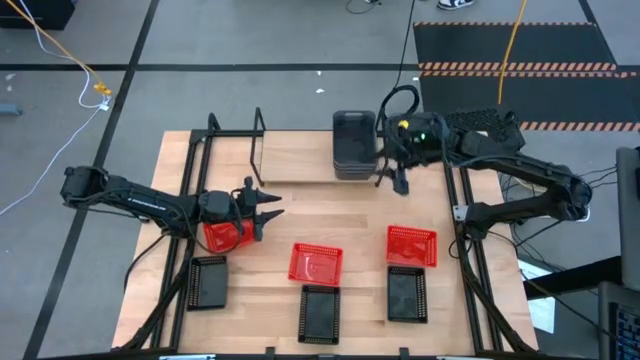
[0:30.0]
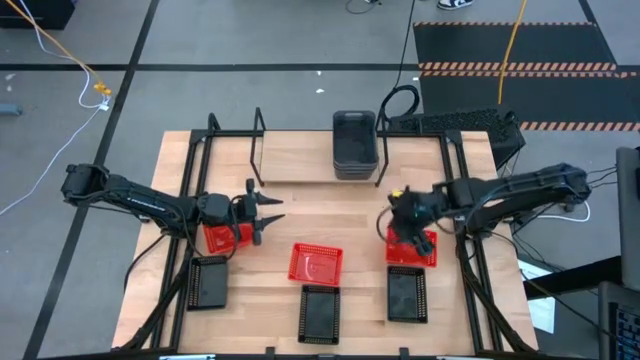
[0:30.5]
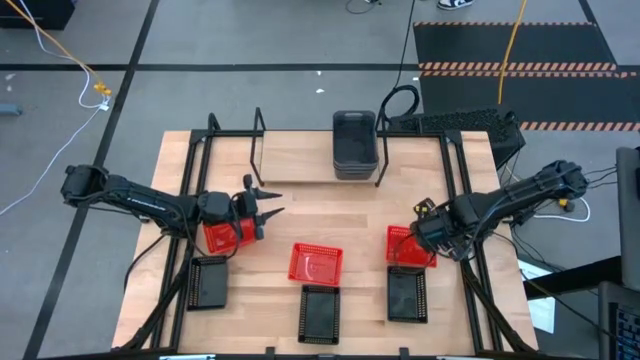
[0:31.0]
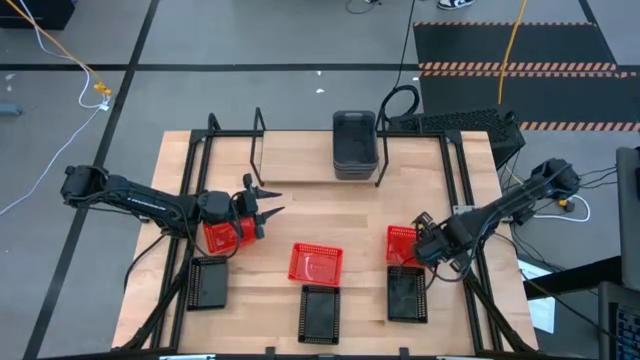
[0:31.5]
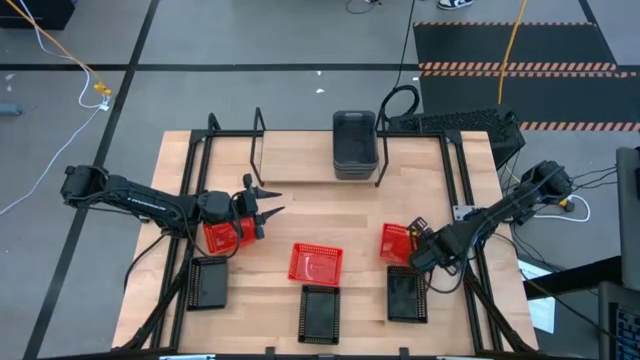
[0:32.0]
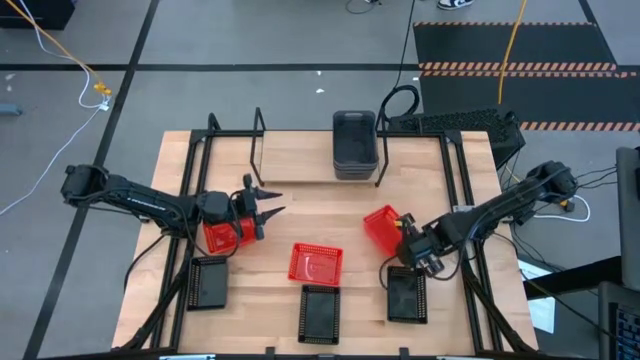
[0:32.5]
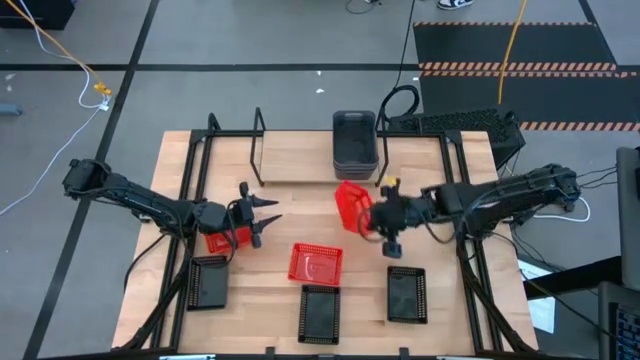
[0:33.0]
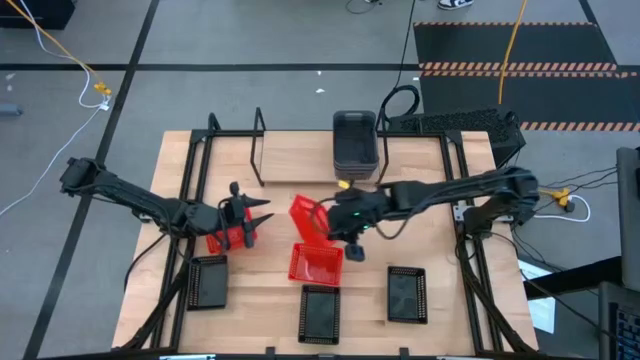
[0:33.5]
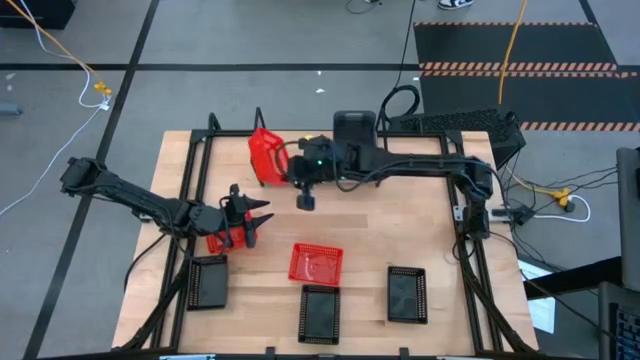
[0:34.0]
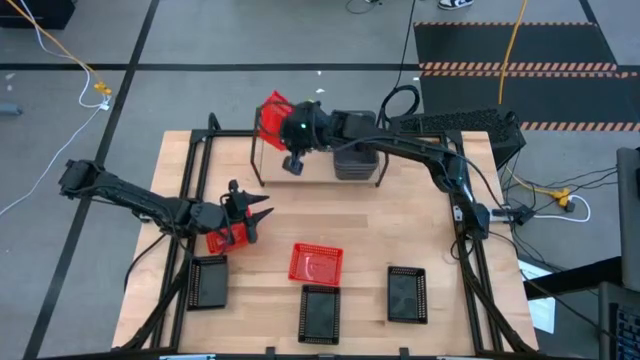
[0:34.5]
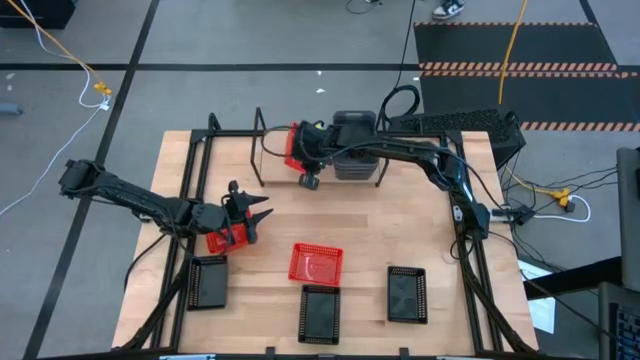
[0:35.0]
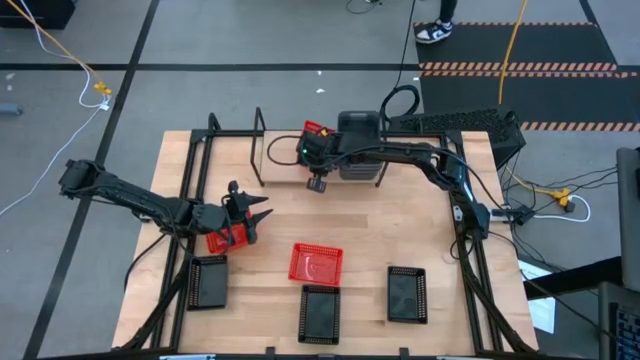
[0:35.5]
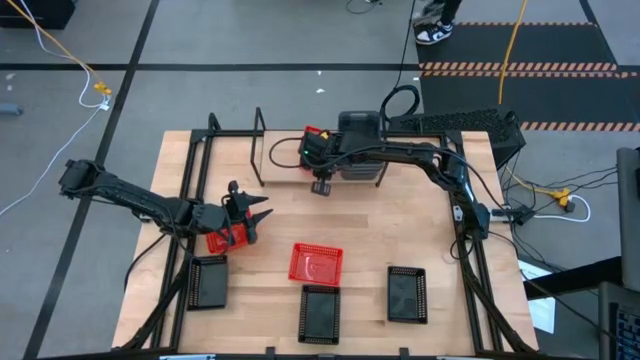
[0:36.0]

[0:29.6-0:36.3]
Task: Stack baskets on shelf by color
Put the right red bin on the shelf

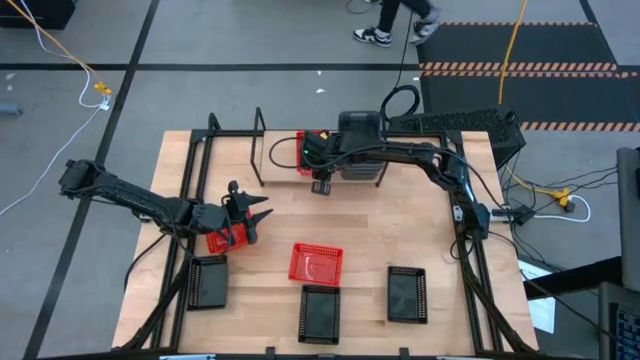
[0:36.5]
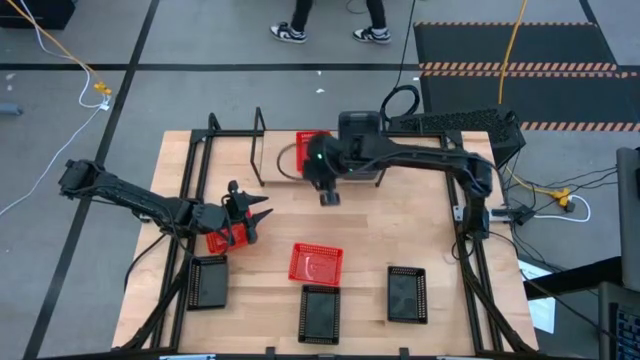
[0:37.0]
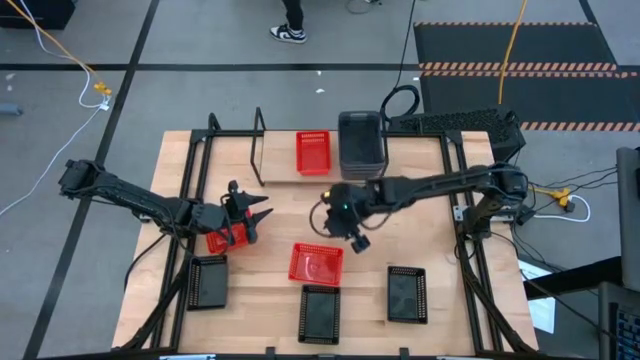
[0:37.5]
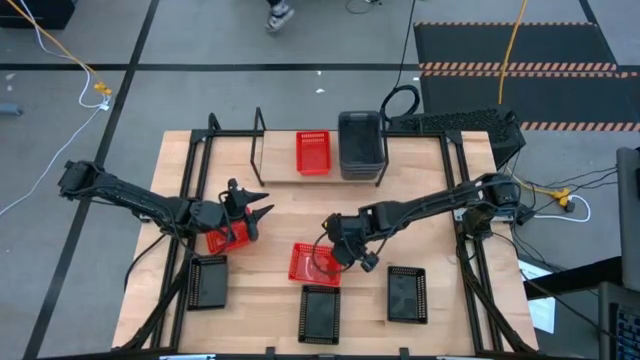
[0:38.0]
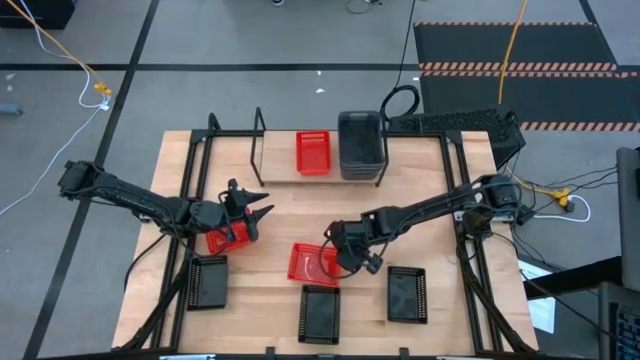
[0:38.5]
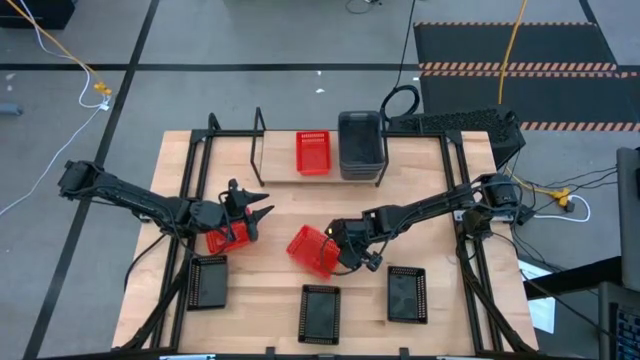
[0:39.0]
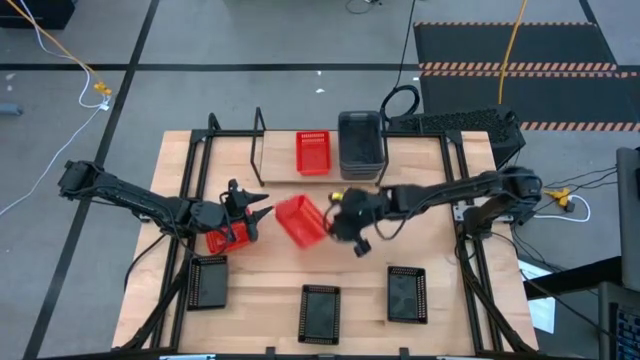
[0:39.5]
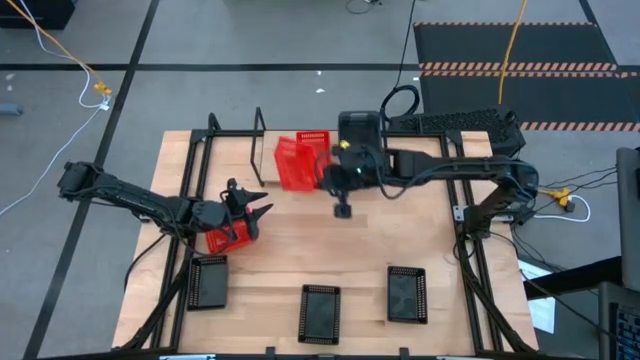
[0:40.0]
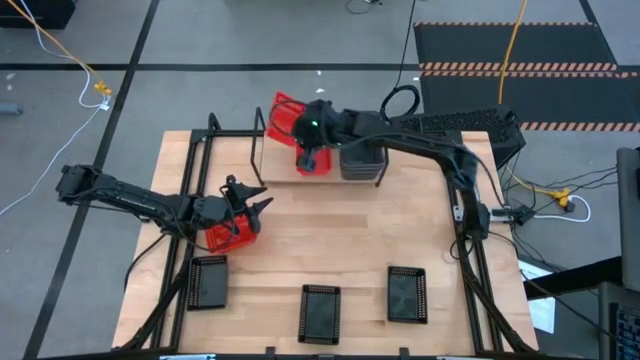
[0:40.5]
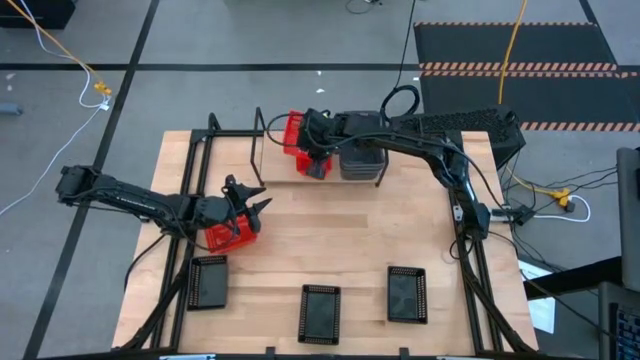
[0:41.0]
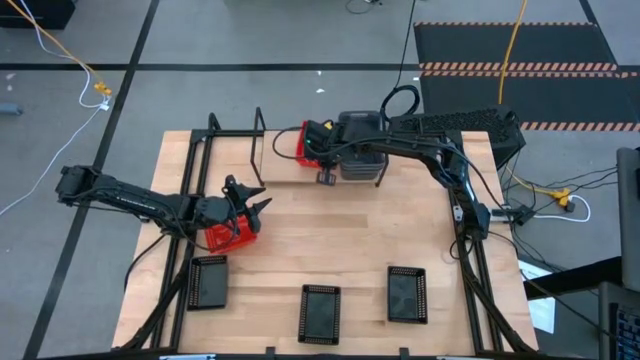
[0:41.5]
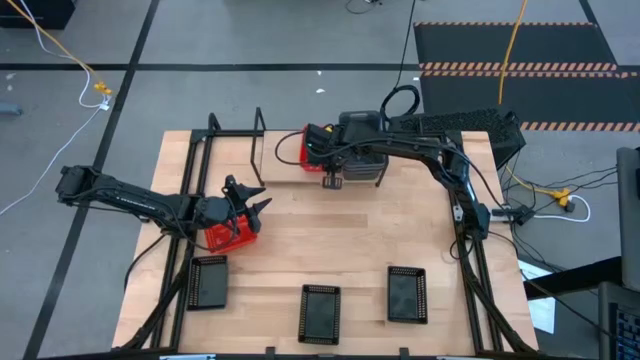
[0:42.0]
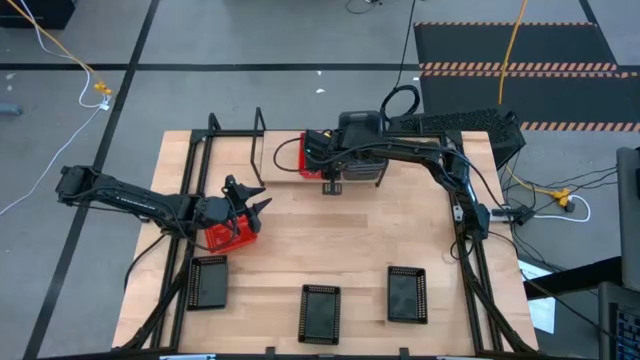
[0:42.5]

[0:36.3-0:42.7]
Stack the bottom red bin on top of the red bin on the shelf

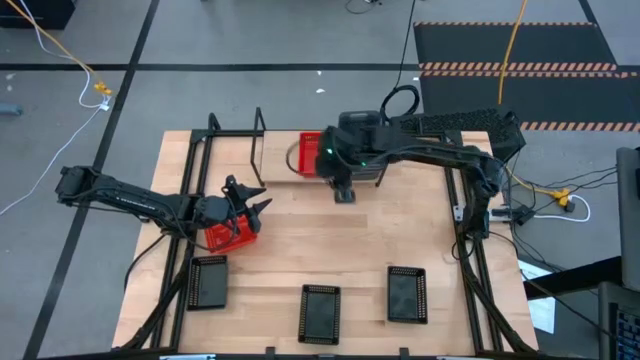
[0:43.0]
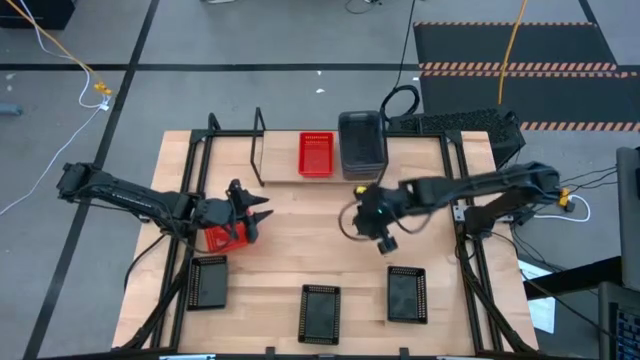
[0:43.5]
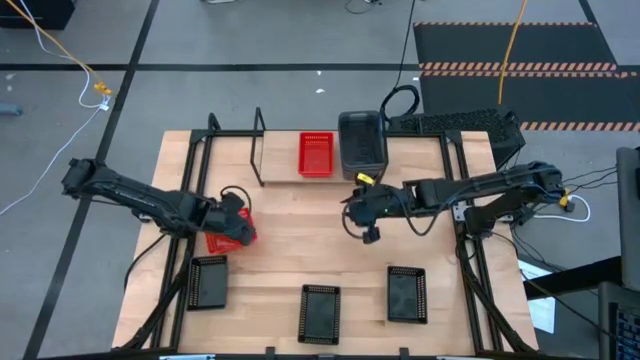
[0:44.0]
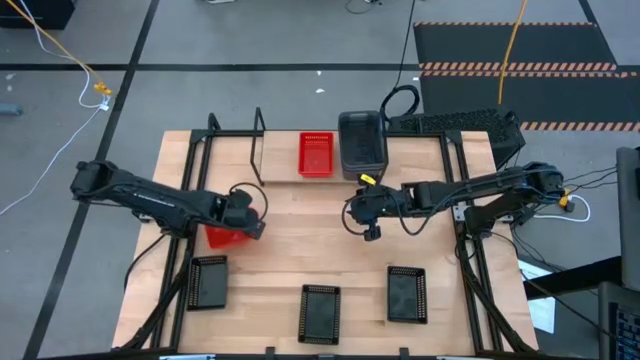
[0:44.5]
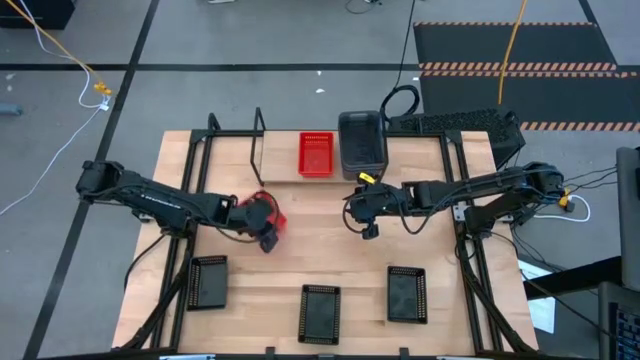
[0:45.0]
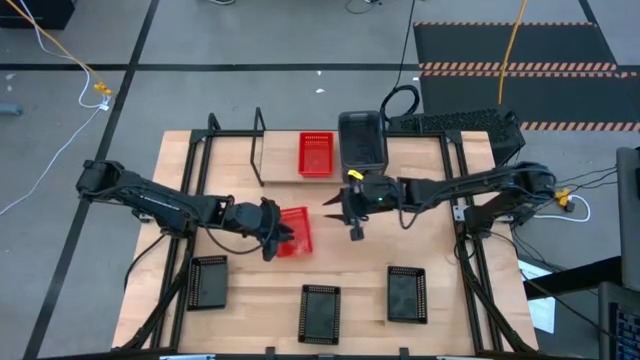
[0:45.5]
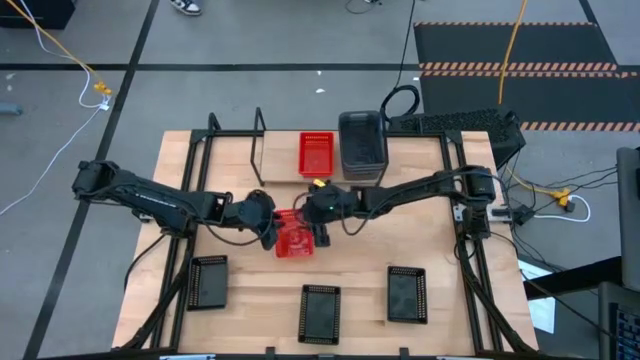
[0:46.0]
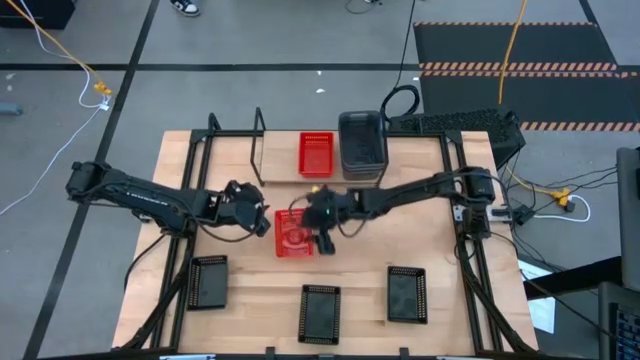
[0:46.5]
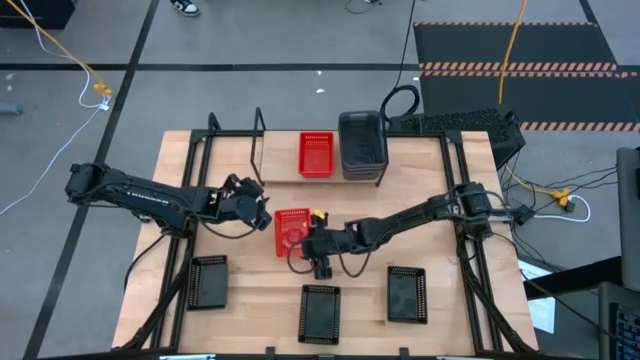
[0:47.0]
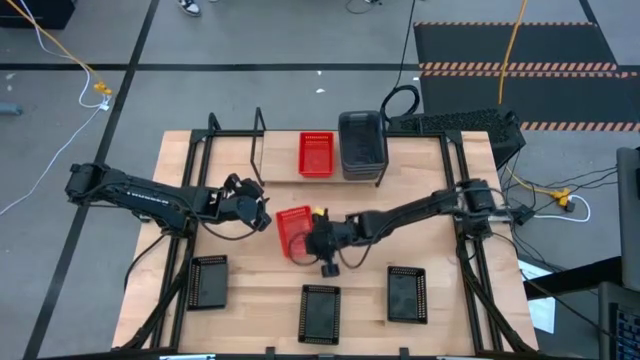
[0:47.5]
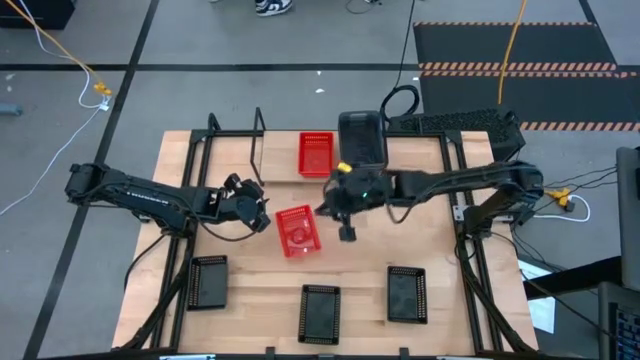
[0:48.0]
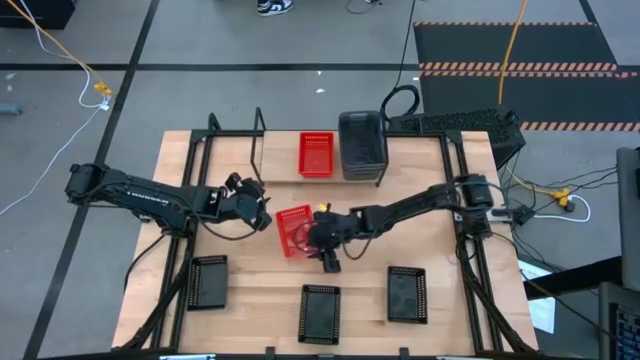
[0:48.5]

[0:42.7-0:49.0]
Stack the red bin on top of the red bins on the shelf

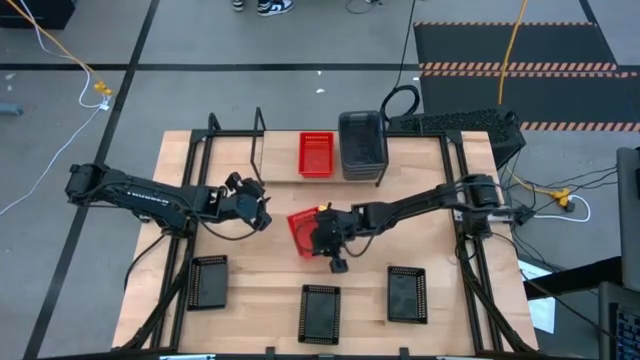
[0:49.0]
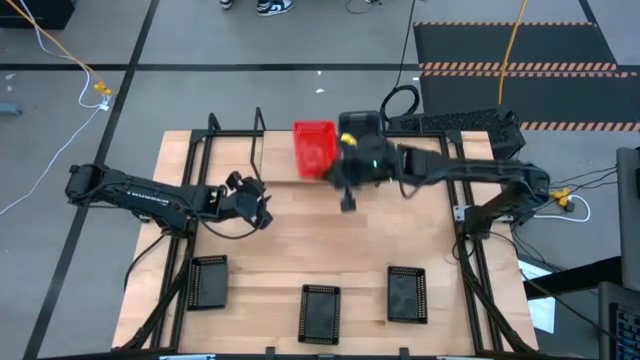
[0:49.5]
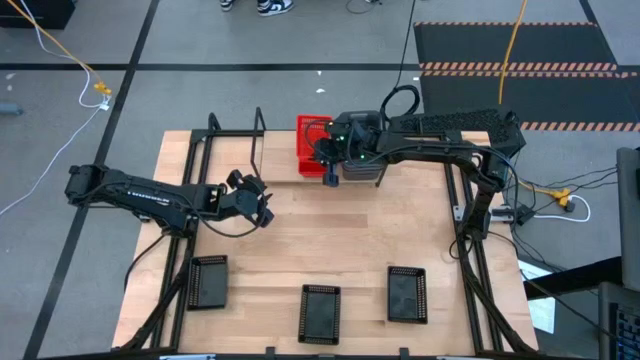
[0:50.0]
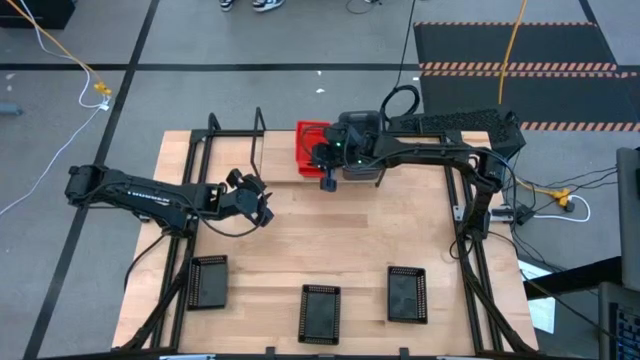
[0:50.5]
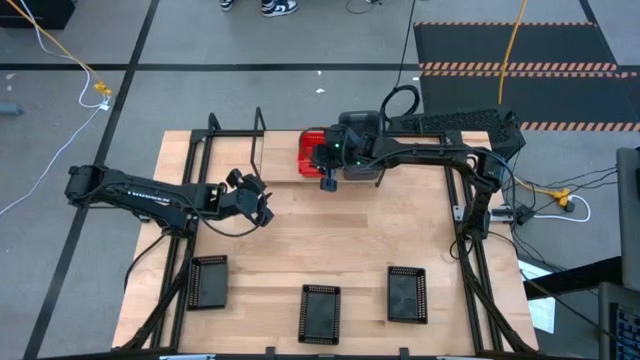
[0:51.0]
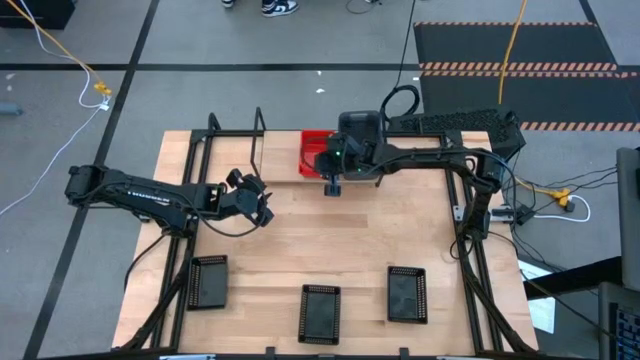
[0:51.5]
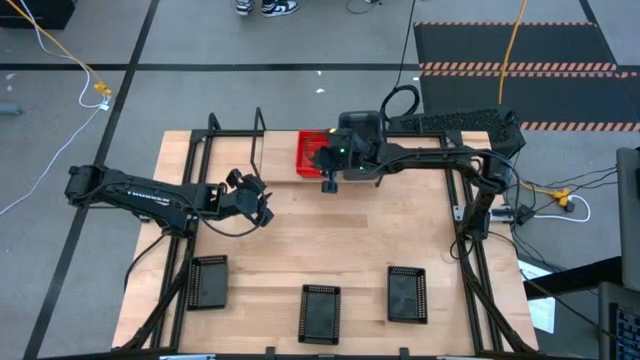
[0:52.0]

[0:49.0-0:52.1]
Stack the red bin on top of the red bins on the shelf
